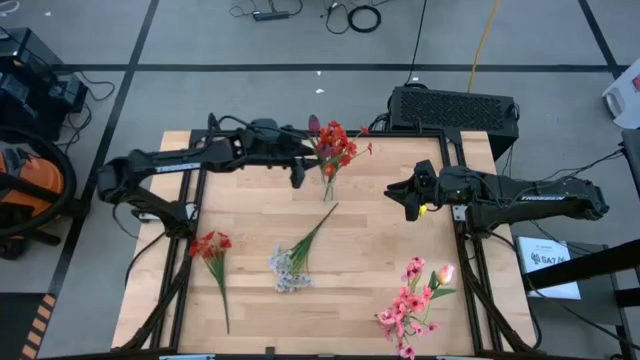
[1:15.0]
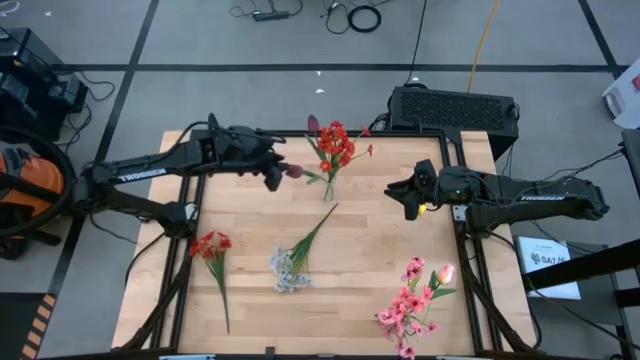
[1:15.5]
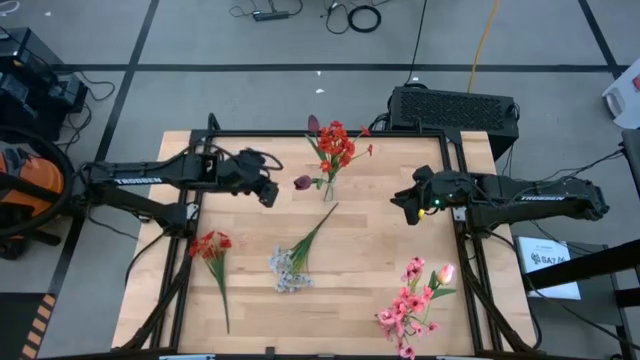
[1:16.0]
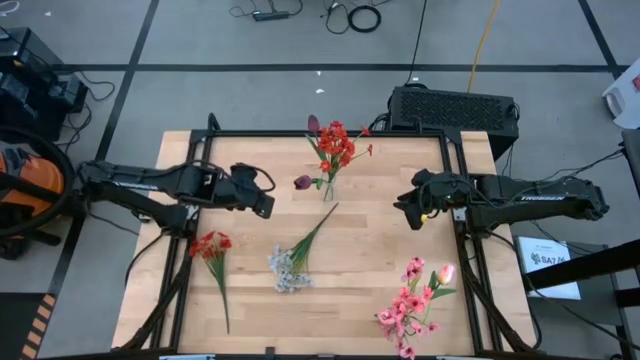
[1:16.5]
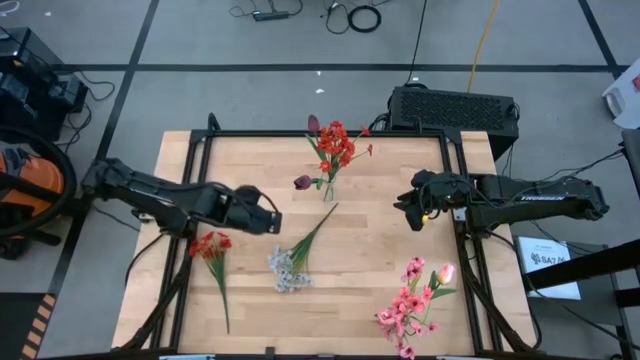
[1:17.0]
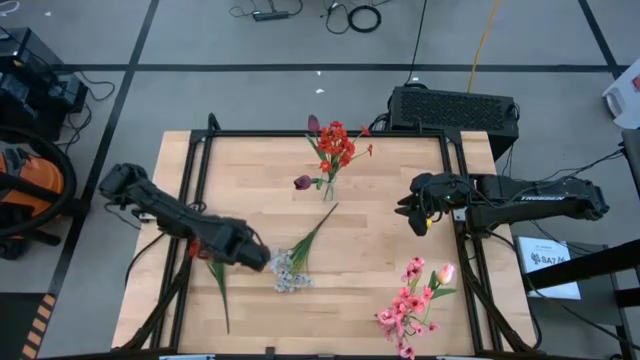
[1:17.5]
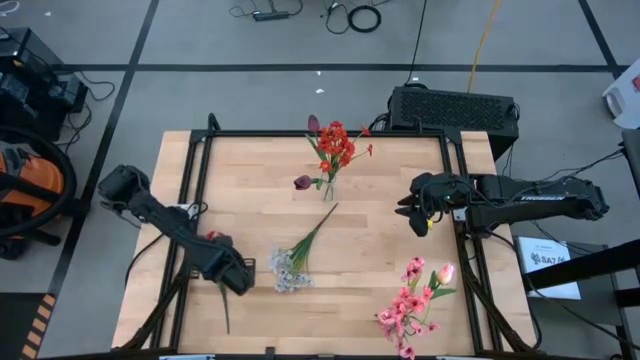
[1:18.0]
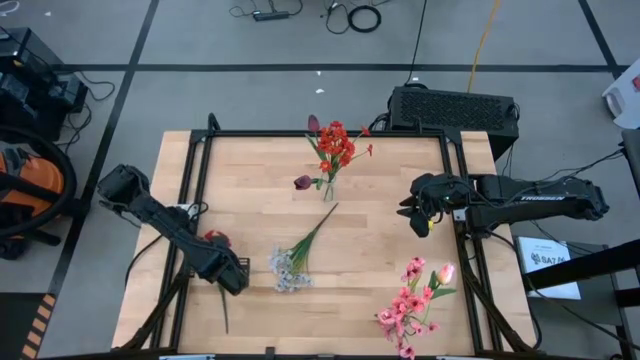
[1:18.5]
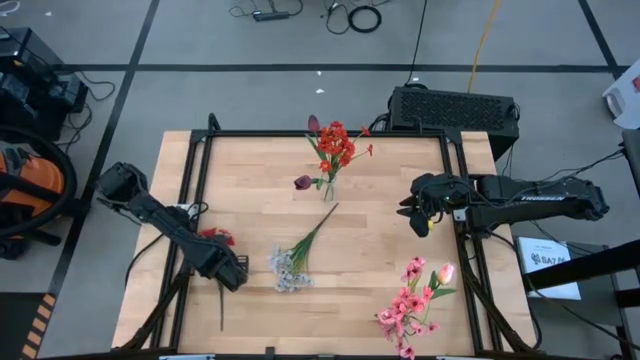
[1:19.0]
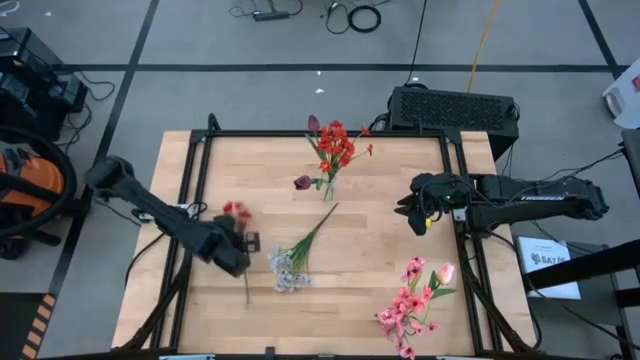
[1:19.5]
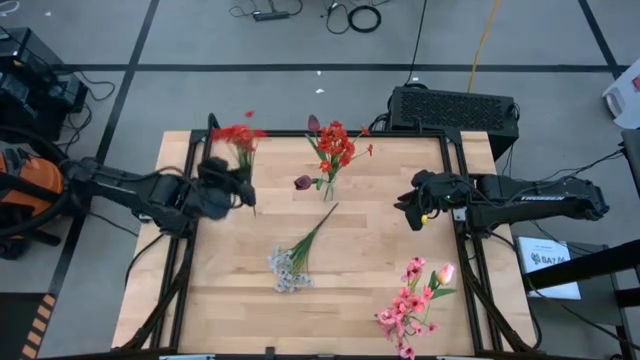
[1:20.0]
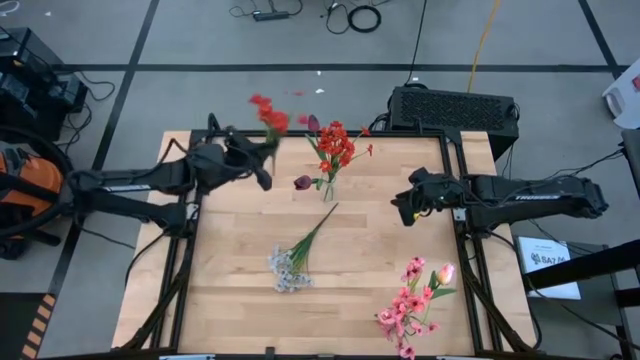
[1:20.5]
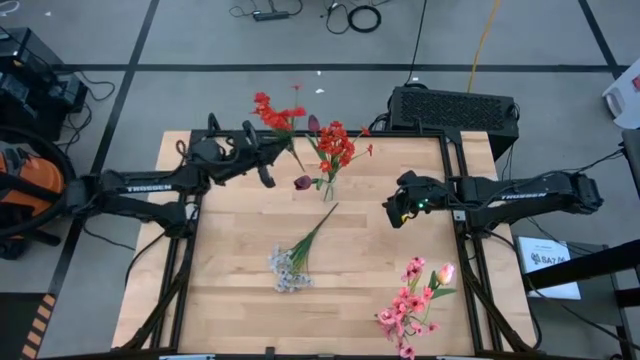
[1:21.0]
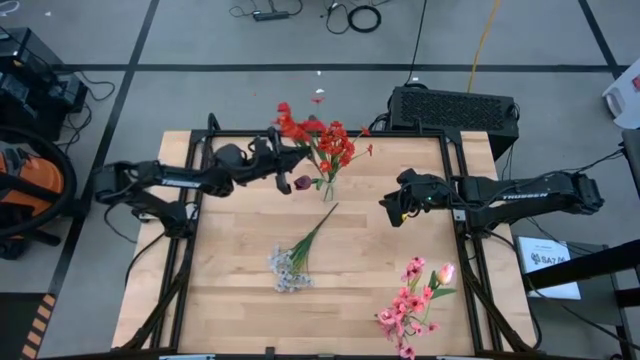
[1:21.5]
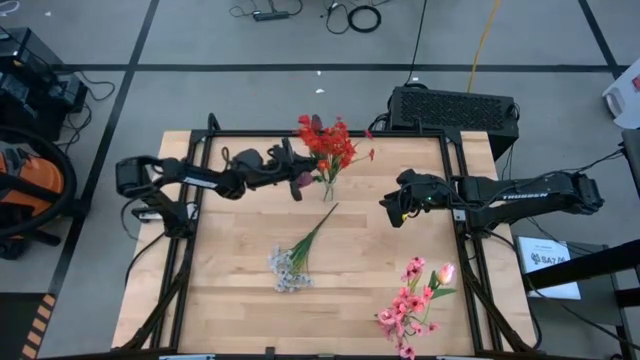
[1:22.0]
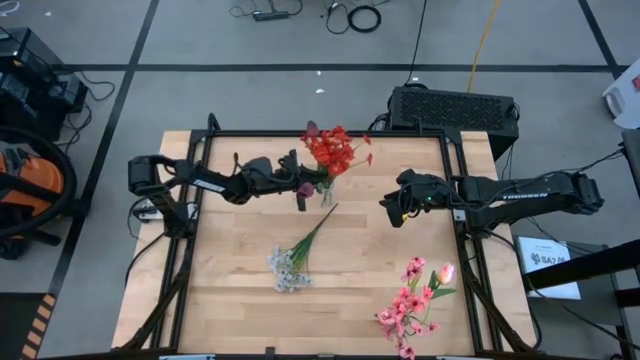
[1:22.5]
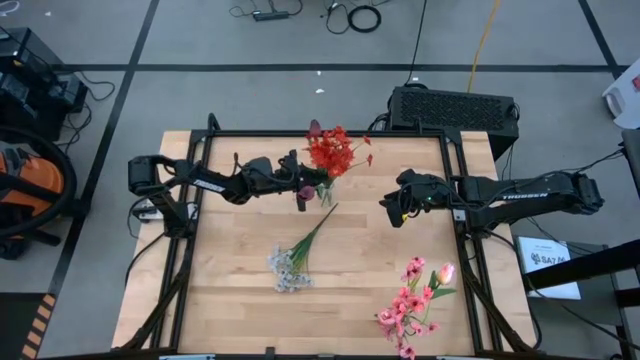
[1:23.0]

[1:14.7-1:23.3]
Task: Sort flowers into vase by color
Put the orange flowers into the transparent vase

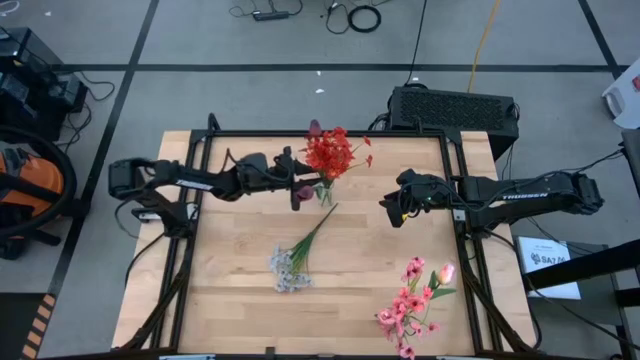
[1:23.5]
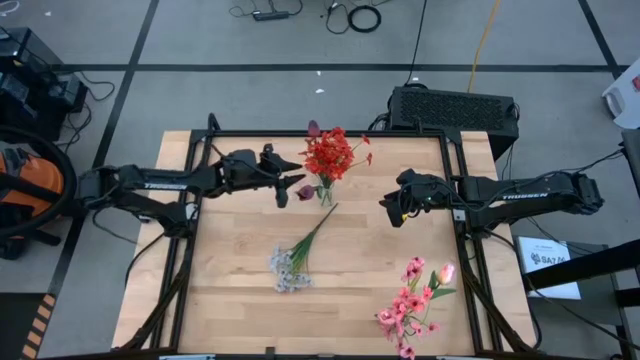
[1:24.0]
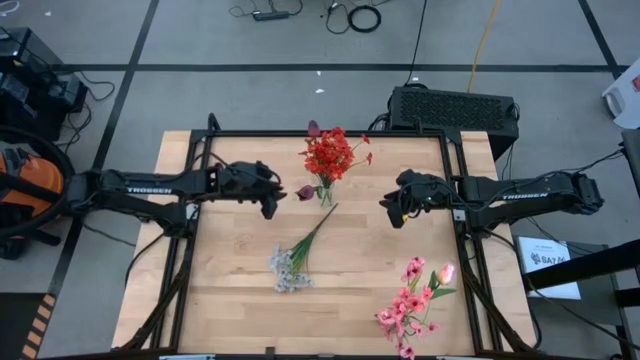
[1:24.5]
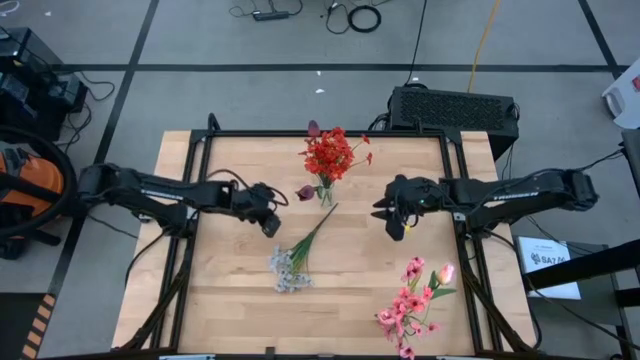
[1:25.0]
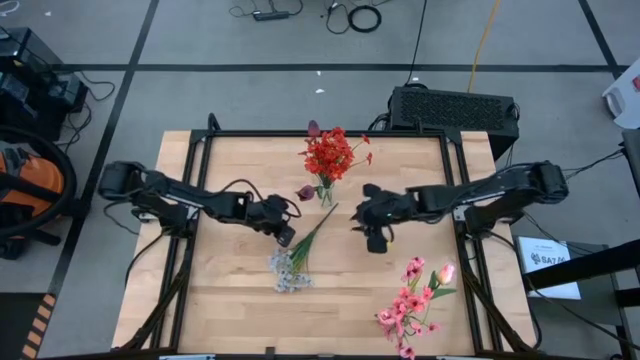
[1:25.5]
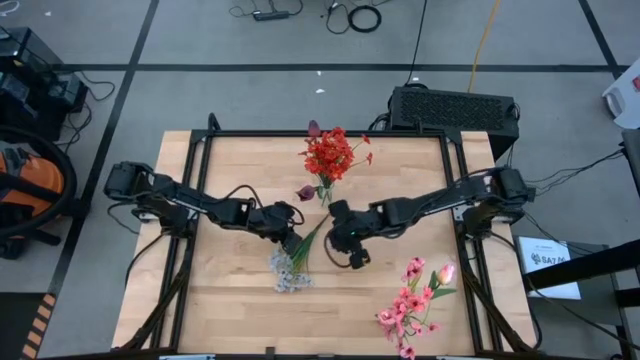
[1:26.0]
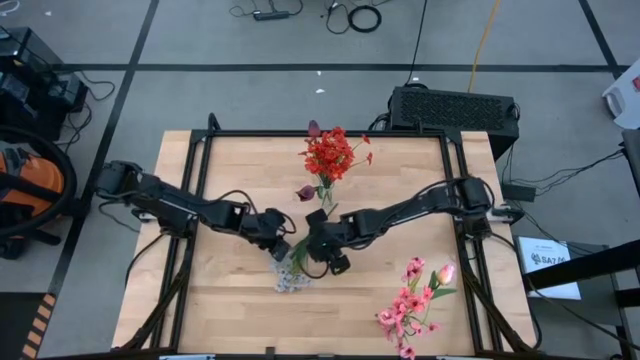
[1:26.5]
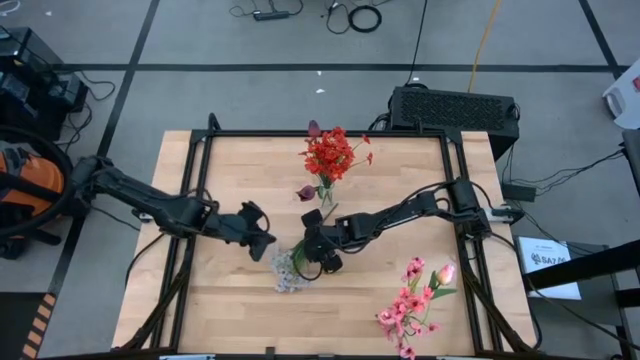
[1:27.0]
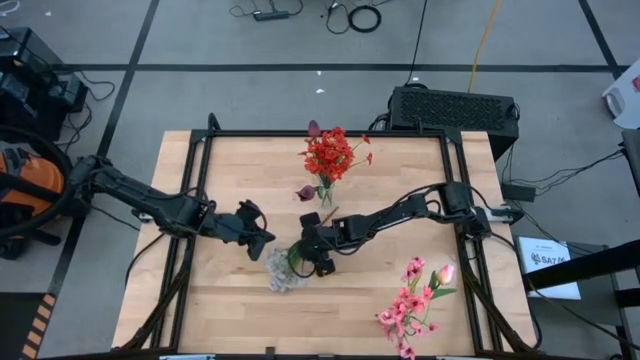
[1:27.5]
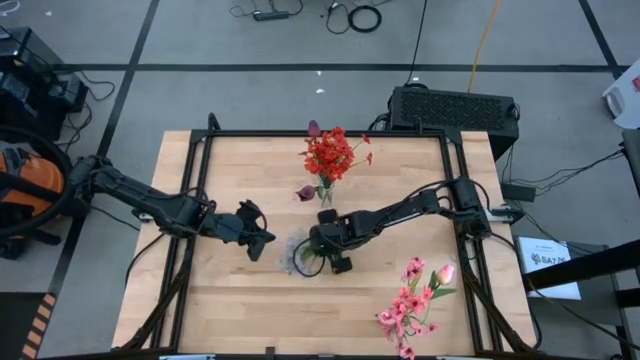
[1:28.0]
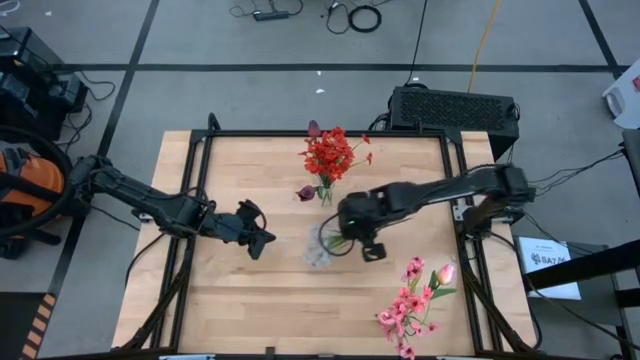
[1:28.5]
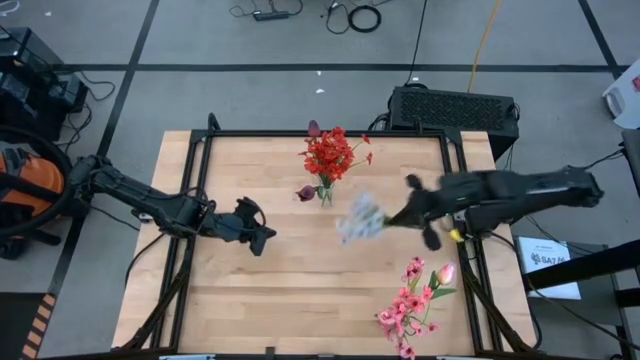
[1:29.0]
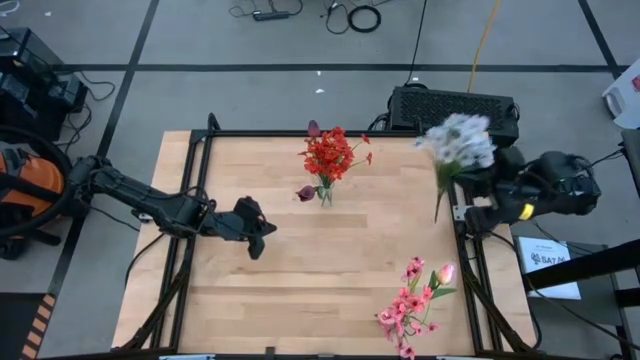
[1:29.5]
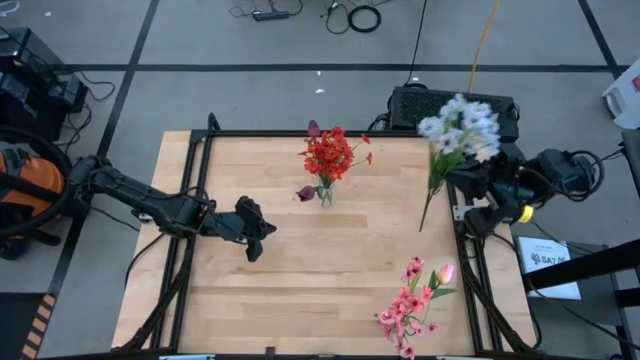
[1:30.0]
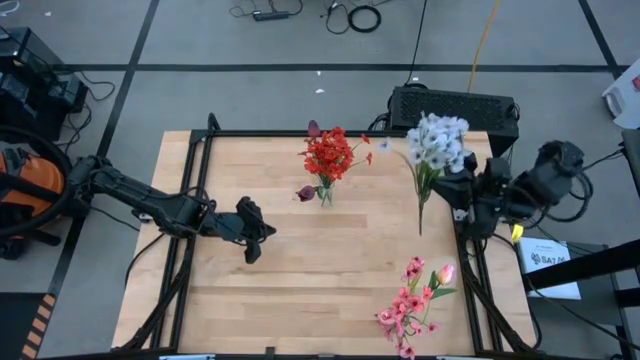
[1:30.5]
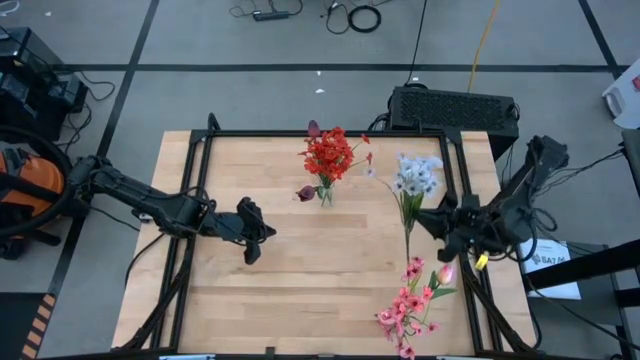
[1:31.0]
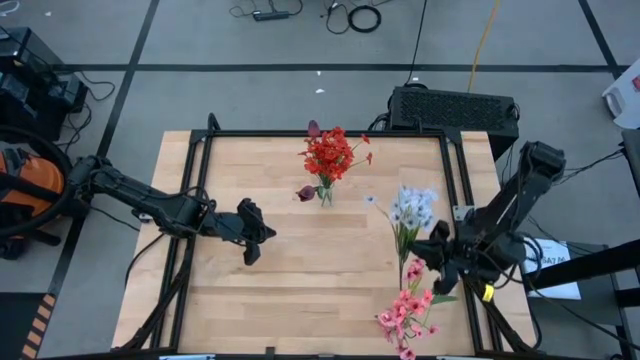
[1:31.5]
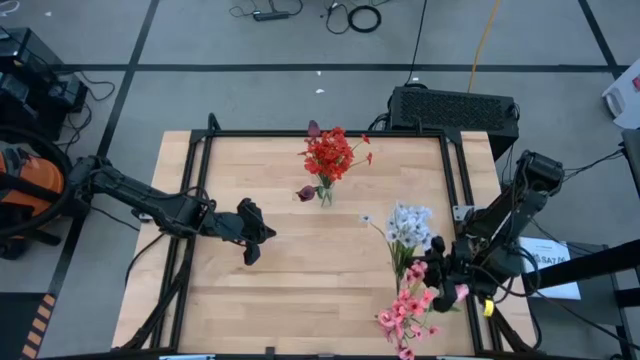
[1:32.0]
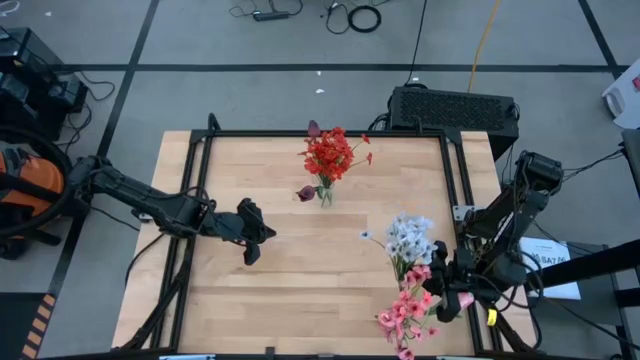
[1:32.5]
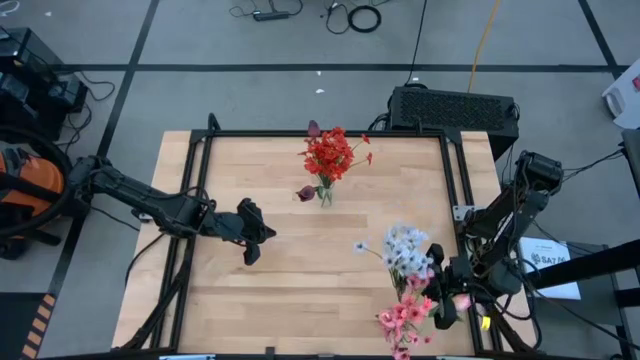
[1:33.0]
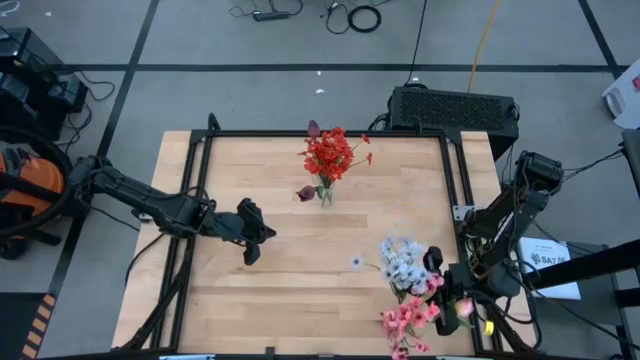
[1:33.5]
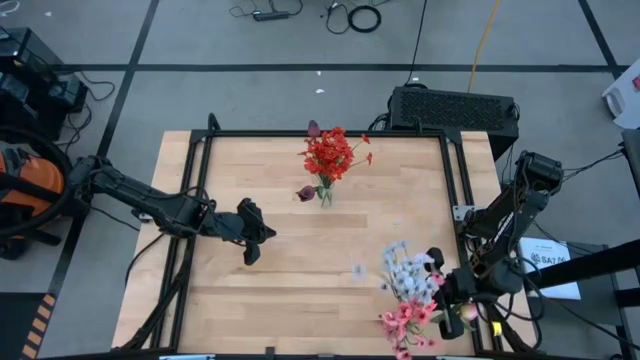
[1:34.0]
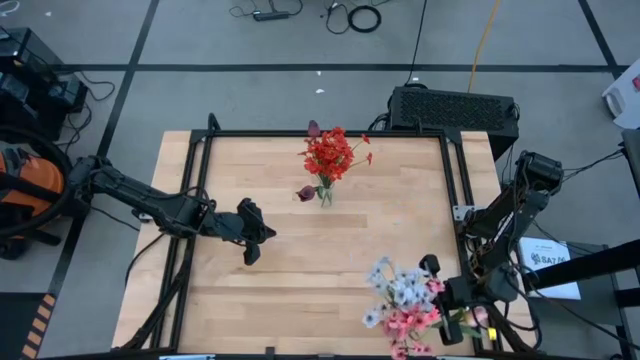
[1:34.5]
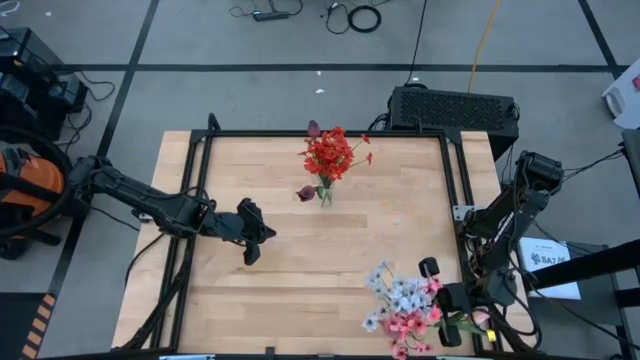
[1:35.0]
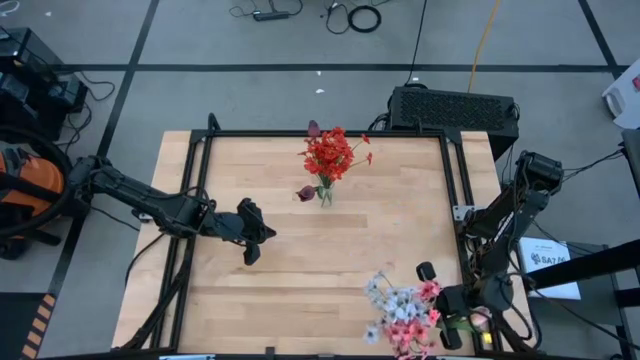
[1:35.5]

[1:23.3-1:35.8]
Put the white flower in the purple vase
